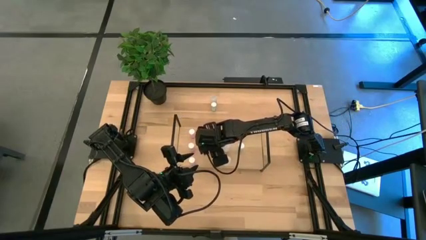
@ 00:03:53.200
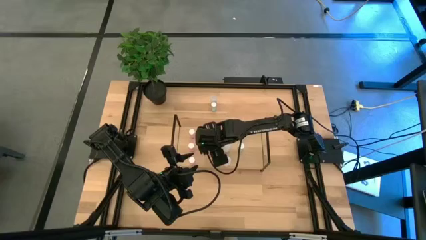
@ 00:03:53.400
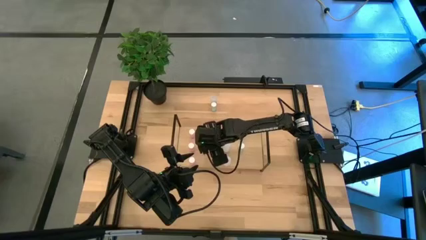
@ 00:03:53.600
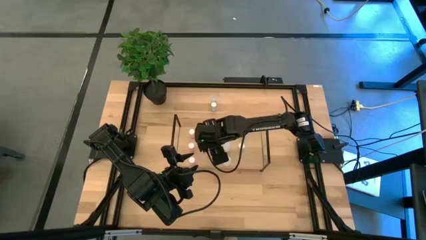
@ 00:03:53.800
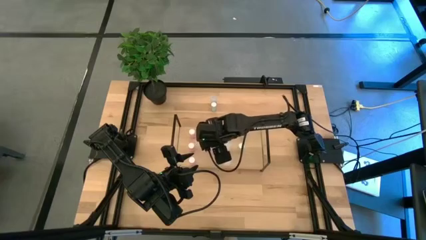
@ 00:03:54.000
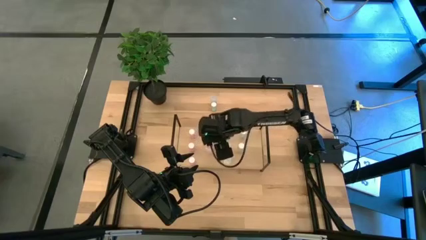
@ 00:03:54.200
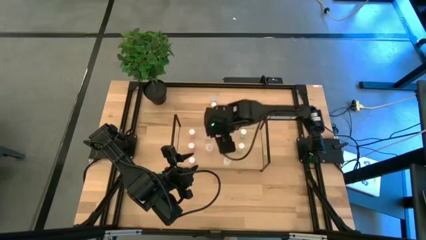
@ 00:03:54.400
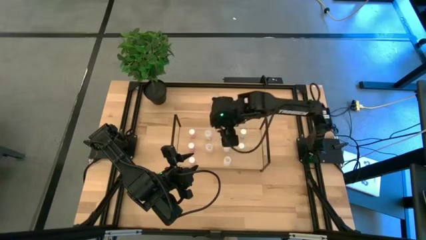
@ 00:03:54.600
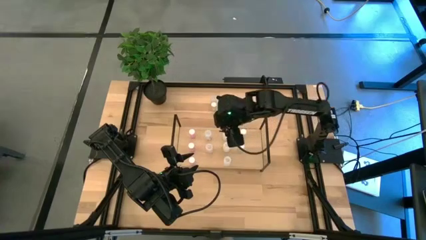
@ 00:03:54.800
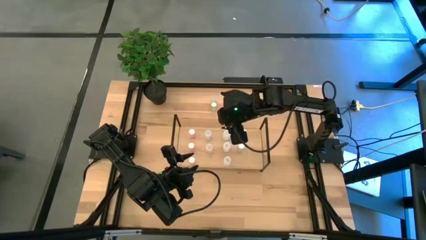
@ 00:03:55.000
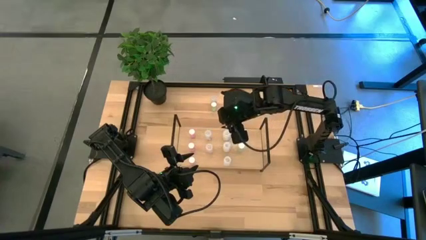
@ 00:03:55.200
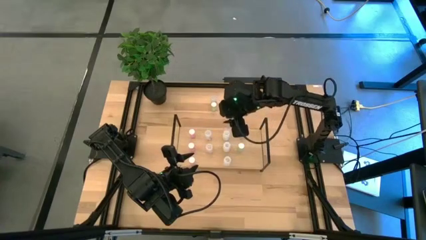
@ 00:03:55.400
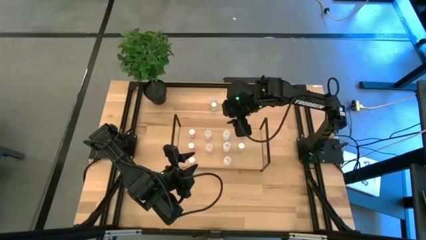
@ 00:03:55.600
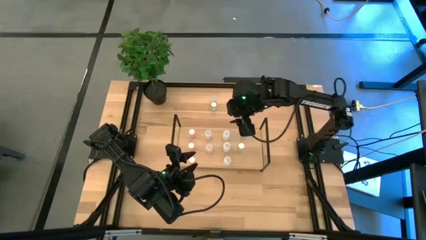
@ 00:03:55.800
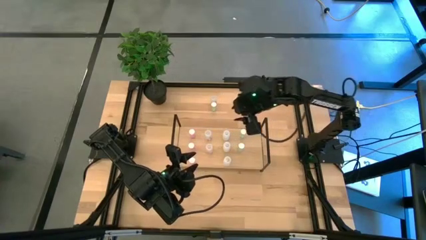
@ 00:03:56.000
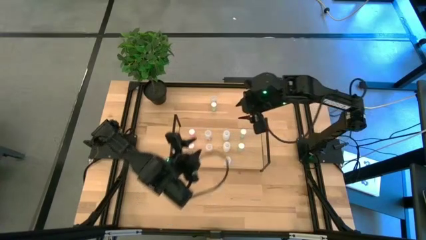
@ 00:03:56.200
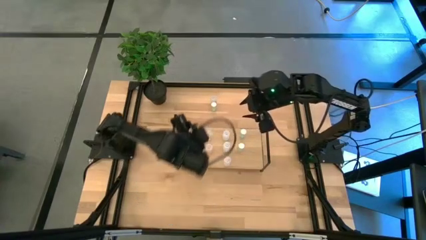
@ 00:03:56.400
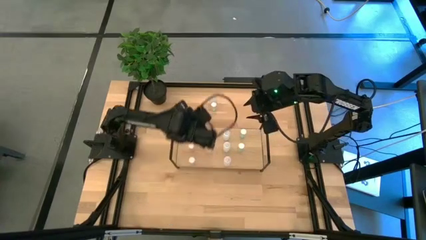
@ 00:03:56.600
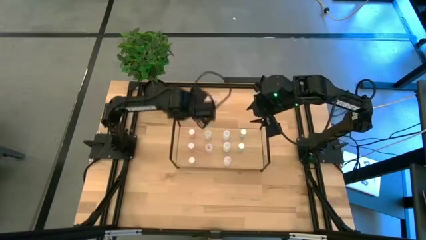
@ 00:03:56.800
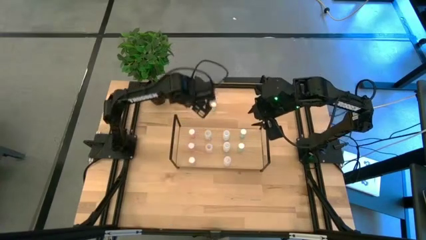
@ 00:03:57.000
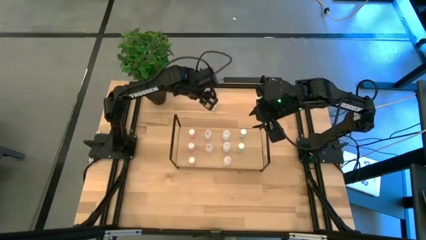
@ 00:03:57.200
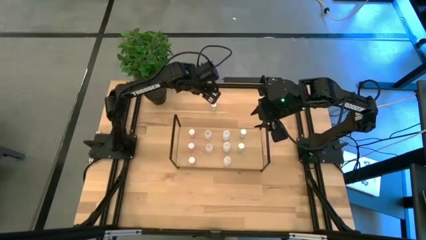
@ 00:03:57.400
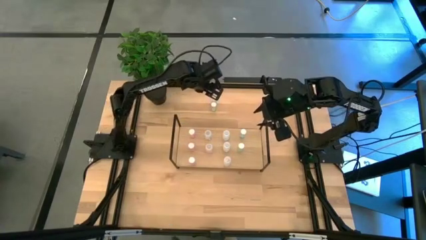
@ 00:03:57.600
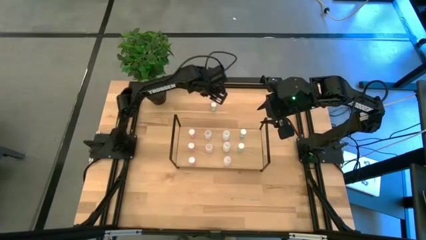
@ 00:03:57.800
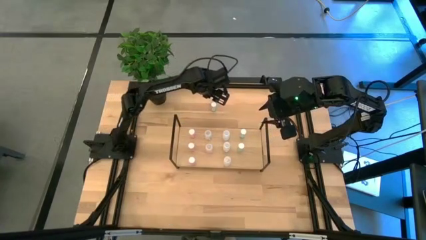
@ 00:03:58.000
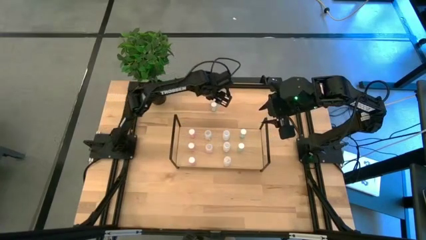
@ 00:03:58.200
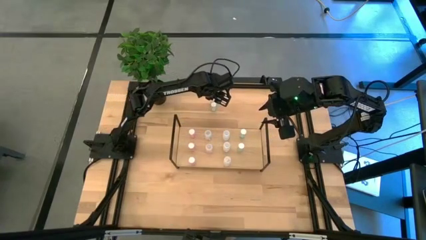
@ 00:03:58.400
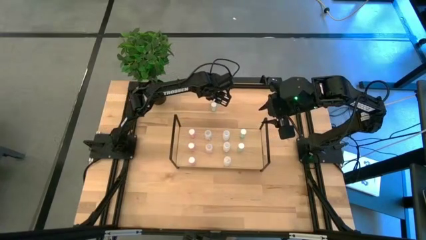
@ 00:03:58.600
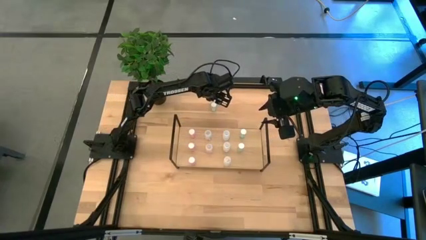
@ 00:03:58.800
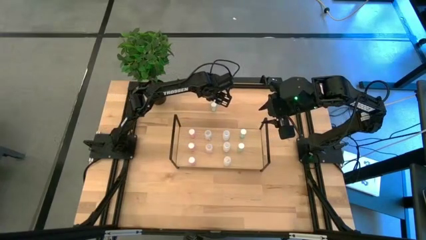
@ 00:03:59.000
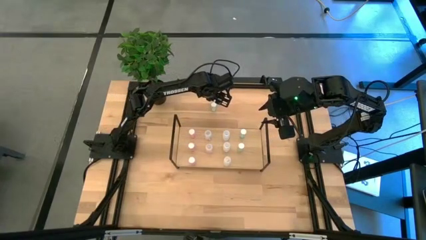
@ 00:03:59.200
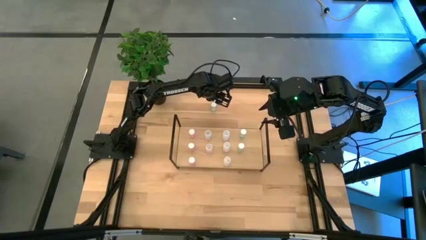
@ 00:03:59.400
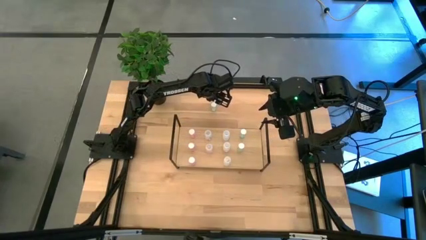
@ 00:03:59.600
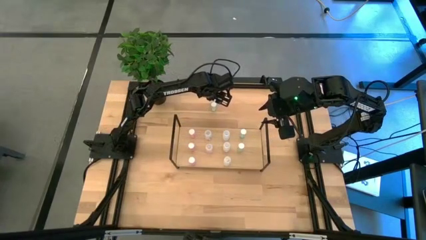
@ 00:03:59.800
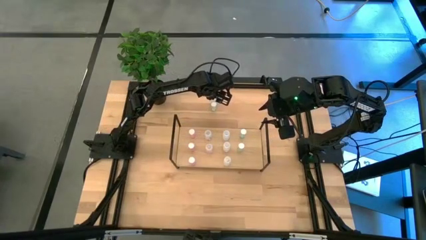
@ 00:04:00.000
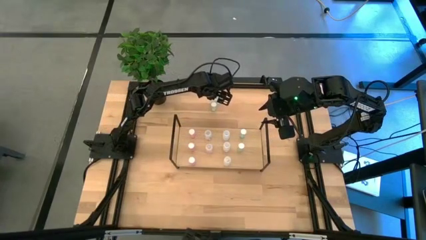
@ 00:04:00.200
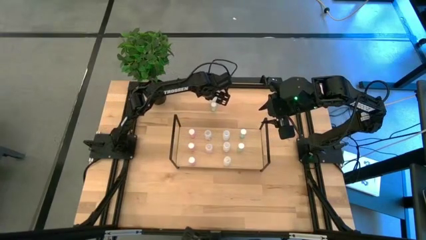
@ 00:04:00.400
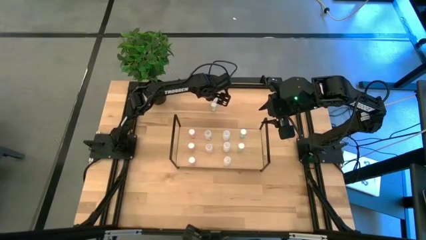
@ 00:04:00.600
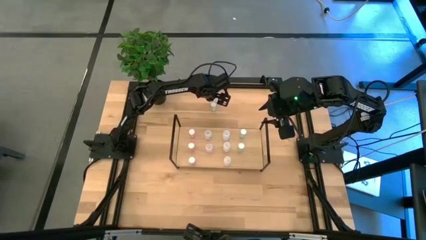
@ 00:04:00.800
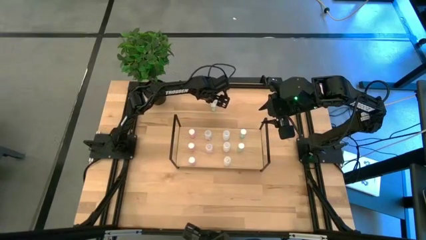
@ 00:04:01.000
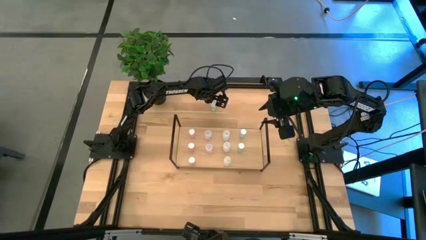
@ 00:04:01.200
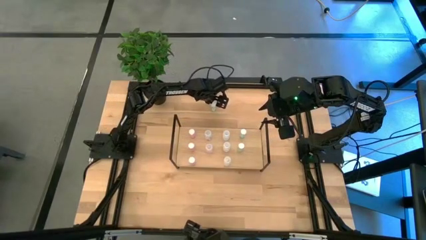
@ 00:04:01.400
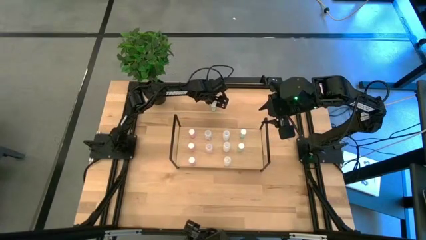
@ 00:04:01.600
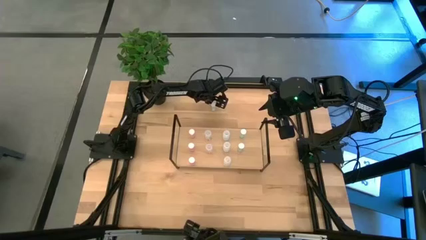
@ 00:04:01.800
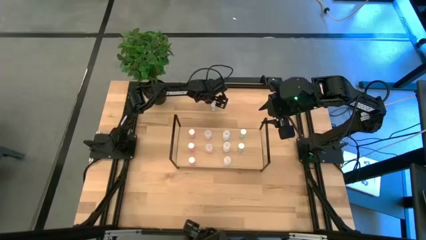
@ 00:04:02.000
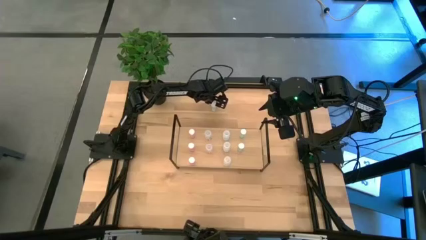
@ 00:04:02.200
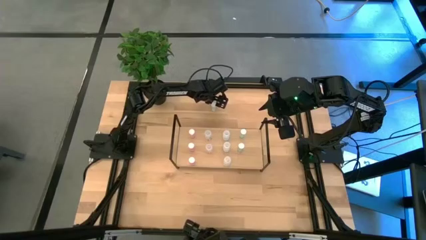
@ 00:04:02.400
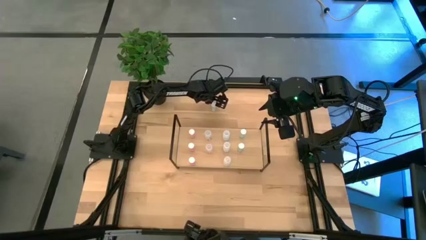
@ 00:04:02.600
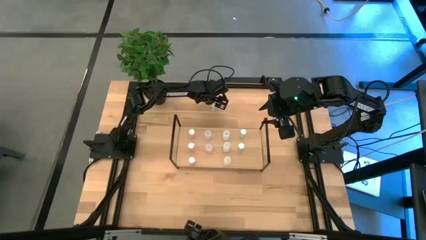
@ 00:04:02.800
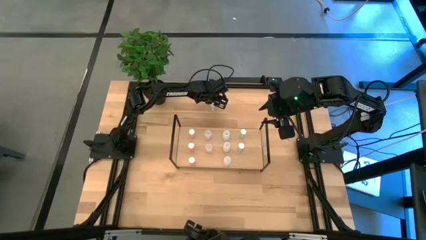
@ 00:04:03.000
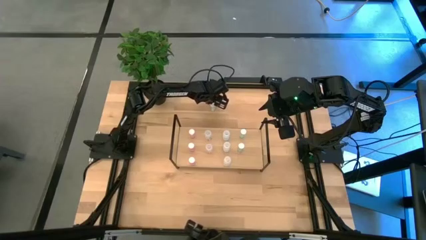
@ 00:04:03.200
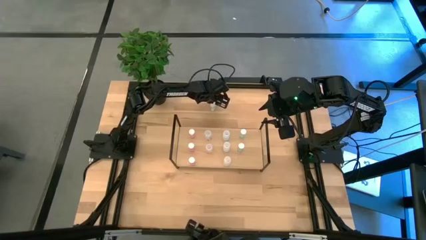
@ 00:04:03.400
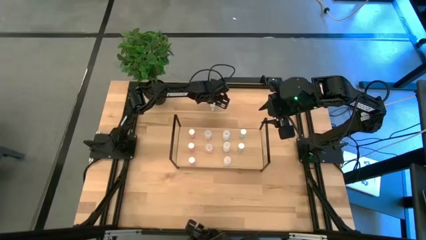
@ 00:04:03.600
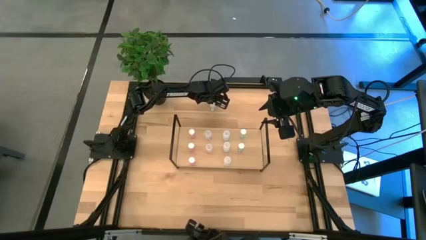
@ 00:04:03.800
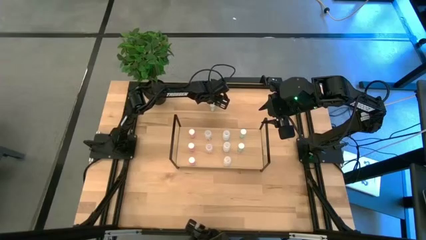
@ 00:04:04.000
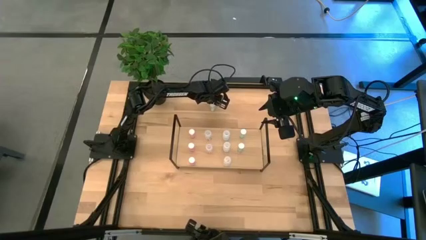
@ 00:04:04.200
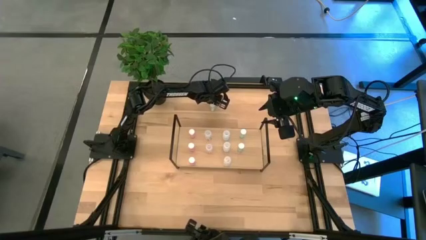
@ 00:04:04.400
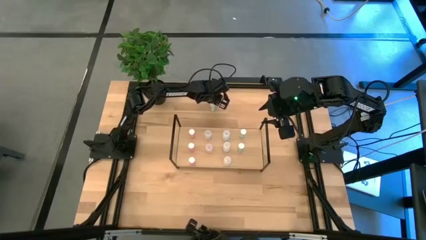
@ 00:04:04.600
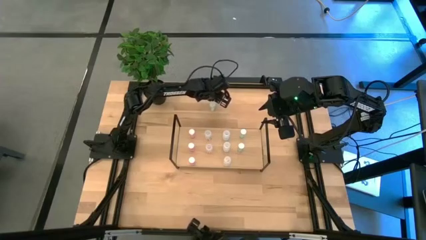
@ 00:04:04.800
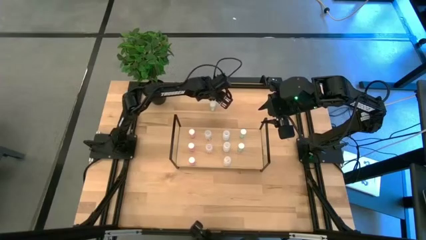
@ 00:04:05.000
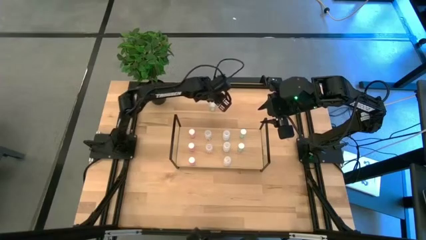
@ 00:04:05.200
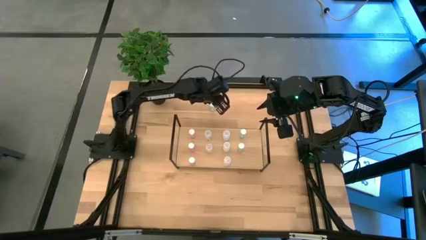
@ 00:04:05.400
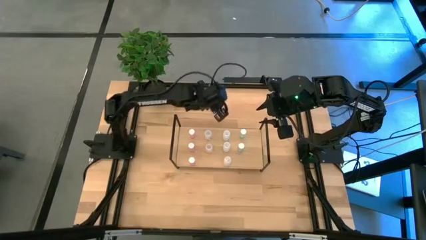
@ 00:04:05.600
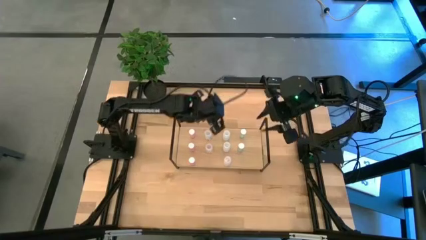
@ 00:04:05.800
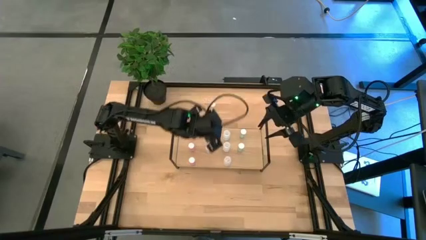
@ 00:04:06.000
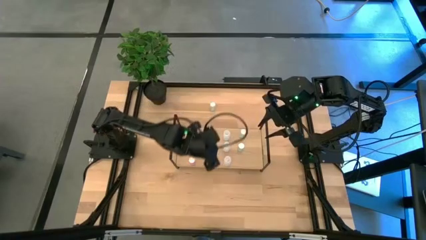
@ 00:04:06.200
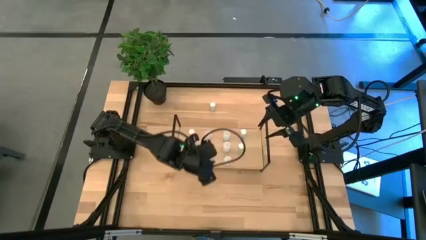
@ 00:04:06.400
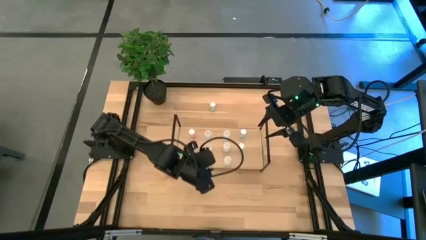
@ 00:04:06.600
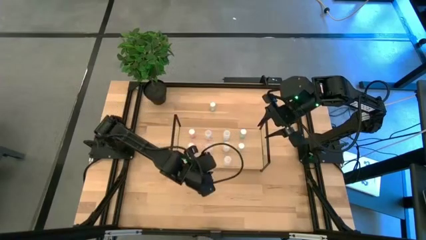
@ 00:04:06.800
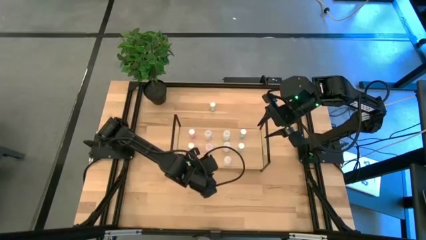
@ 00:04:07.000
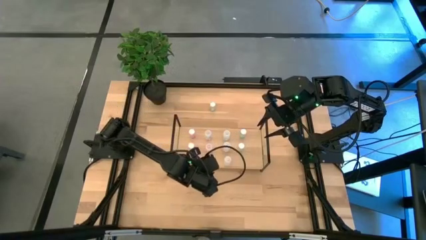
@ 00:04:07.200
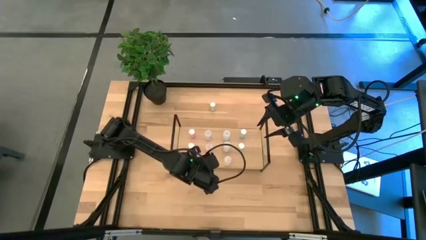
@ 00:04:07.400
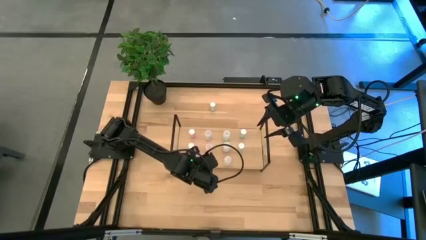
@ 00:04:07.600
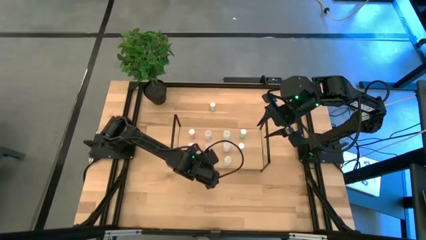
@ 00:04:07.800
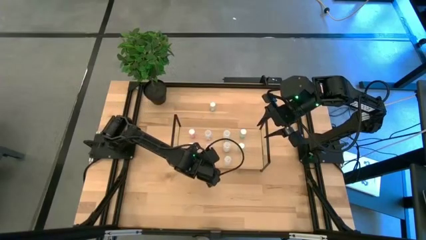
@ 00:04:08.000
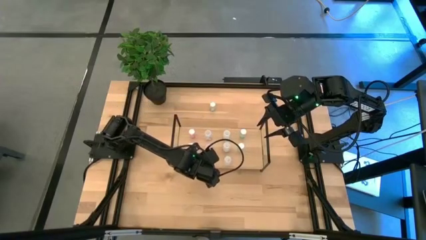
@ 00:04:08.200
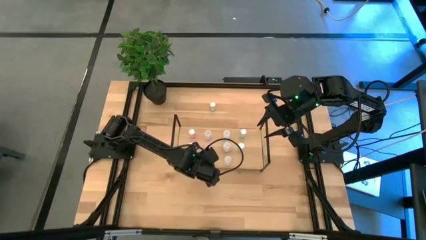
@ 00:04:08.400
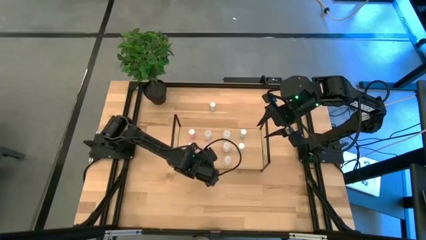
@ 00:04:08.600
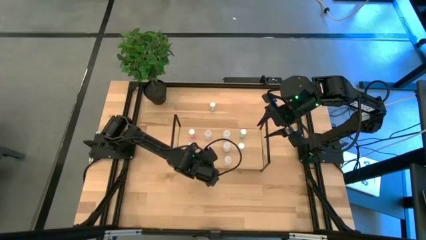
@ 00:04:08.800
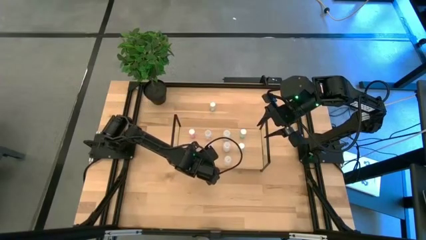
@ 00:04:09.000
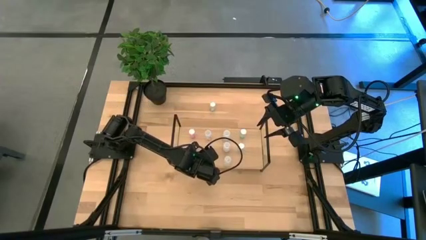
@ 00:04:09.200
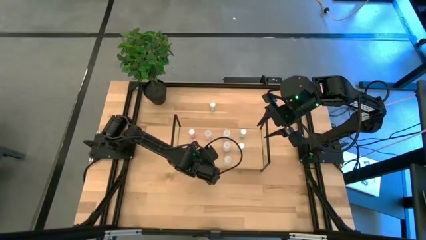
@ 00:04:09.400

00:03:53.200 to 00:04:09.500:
Task: Pick and place medicine bottles onto shelf by color
Put the transparent pill bottle on the shelf aligned with the other transparent pill bottles
